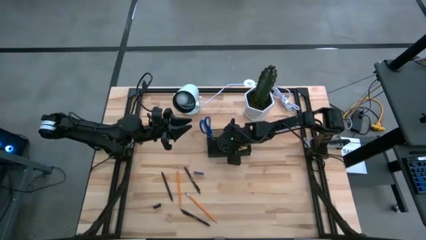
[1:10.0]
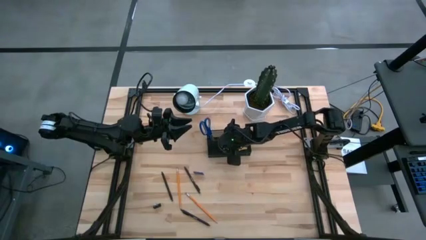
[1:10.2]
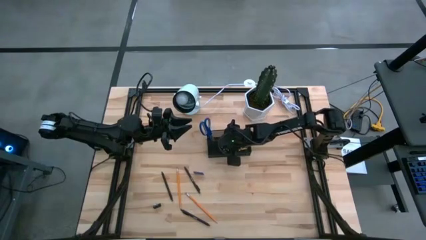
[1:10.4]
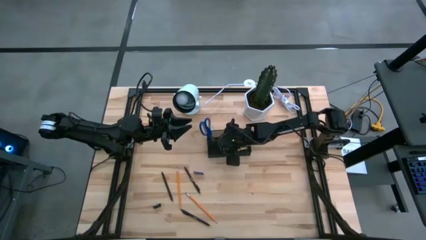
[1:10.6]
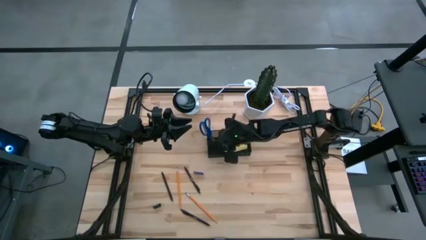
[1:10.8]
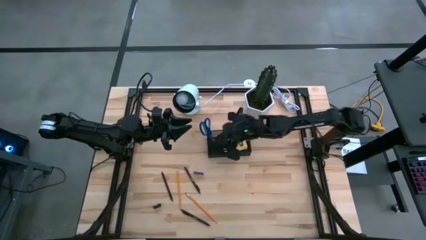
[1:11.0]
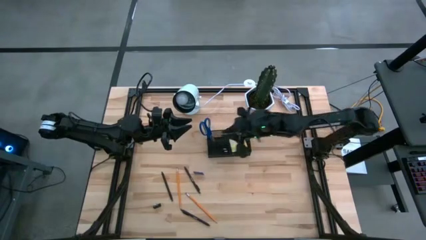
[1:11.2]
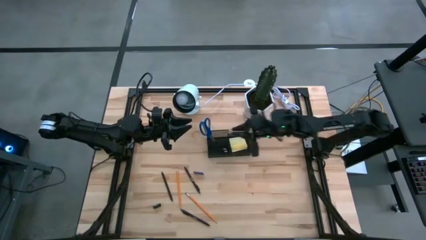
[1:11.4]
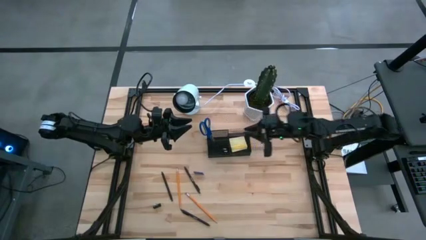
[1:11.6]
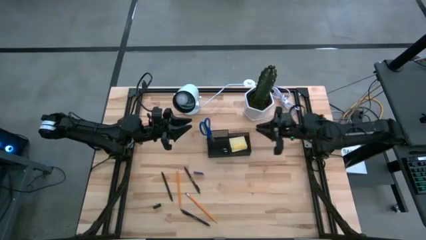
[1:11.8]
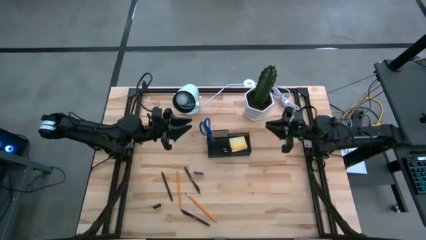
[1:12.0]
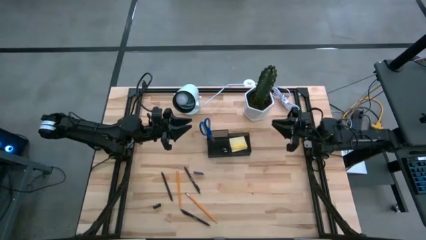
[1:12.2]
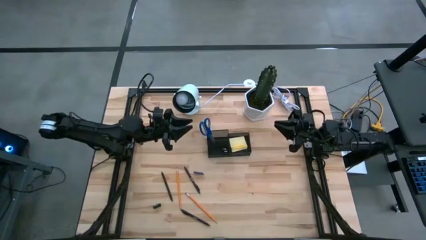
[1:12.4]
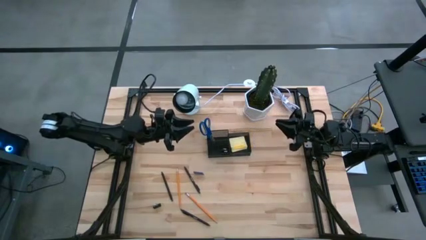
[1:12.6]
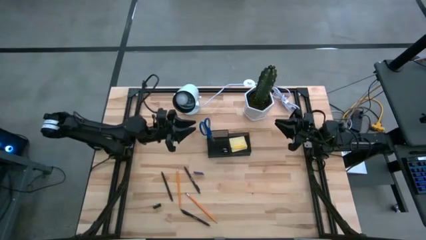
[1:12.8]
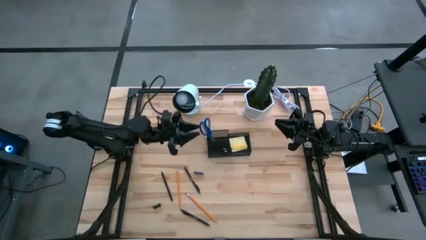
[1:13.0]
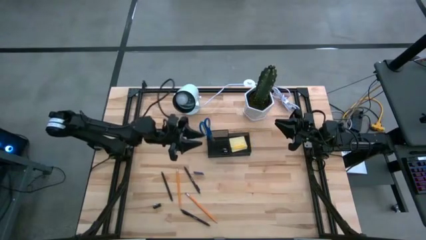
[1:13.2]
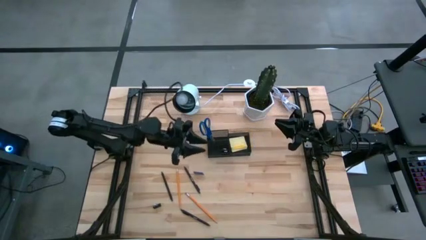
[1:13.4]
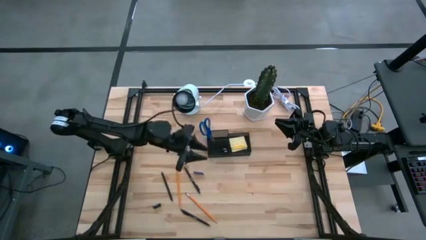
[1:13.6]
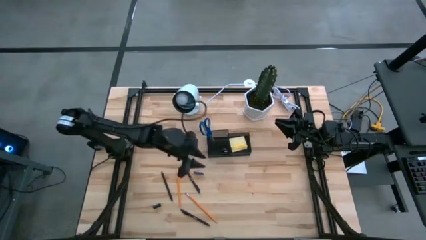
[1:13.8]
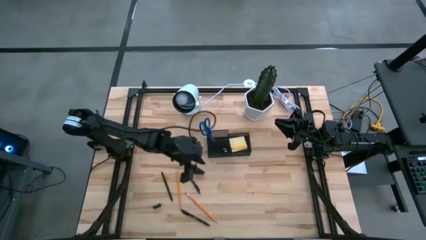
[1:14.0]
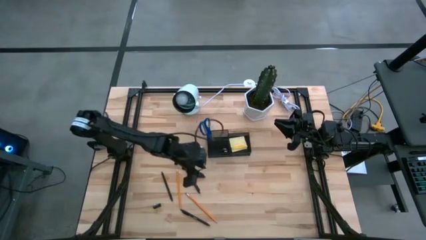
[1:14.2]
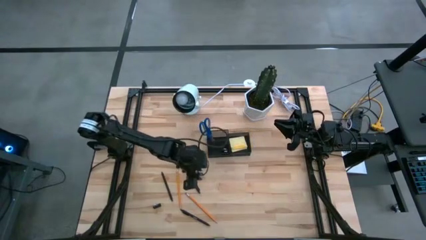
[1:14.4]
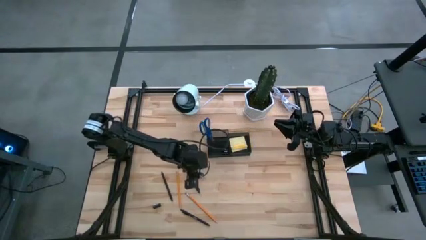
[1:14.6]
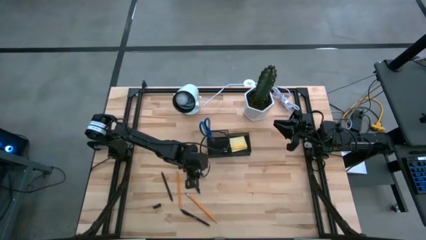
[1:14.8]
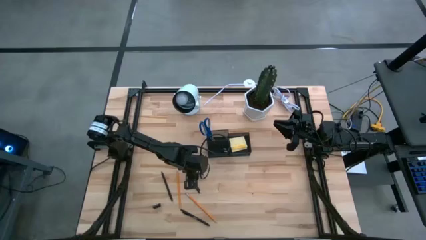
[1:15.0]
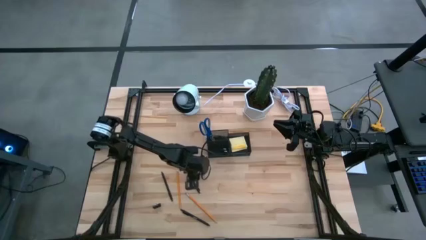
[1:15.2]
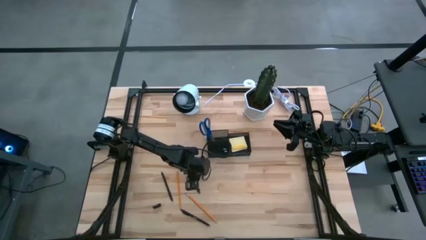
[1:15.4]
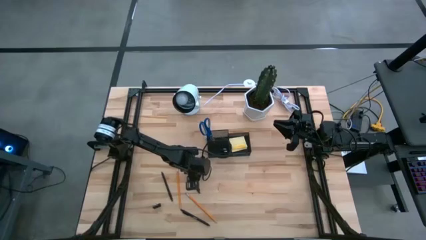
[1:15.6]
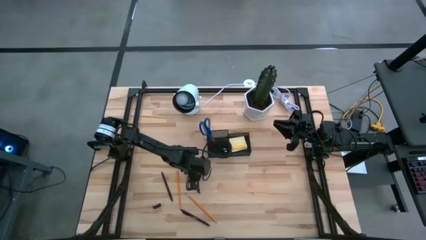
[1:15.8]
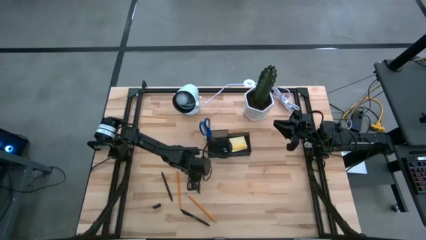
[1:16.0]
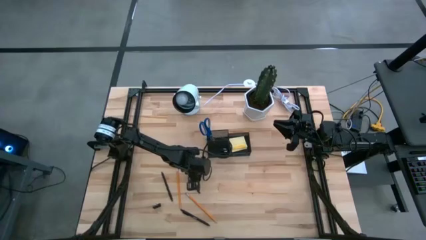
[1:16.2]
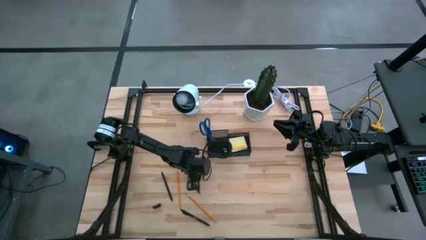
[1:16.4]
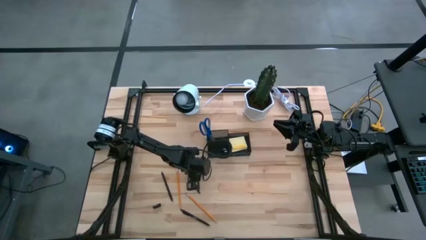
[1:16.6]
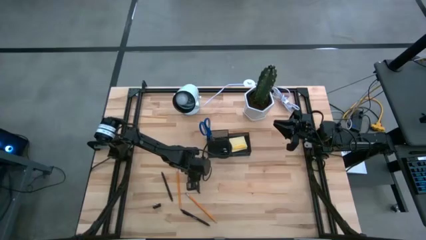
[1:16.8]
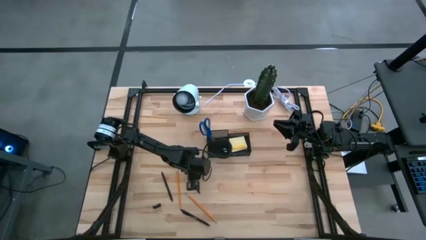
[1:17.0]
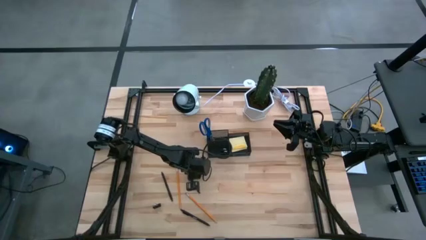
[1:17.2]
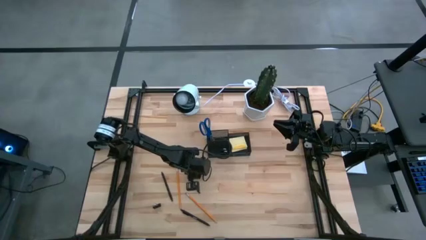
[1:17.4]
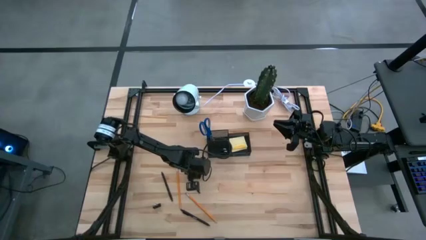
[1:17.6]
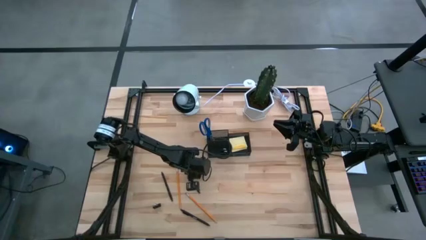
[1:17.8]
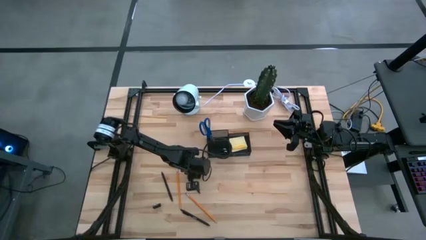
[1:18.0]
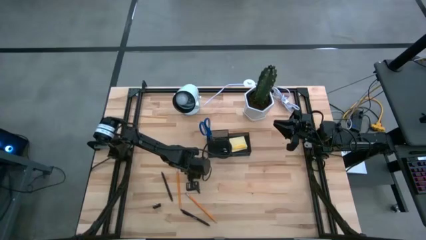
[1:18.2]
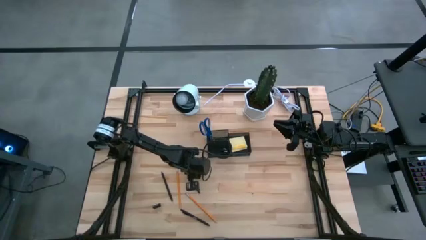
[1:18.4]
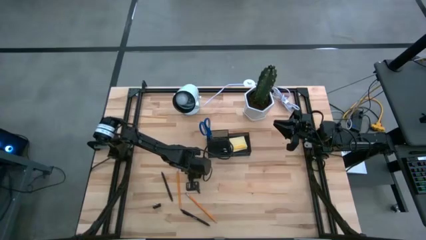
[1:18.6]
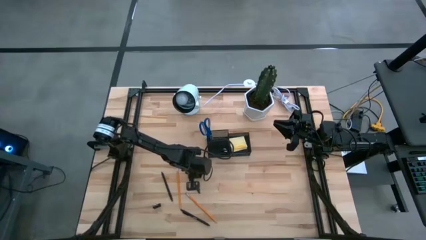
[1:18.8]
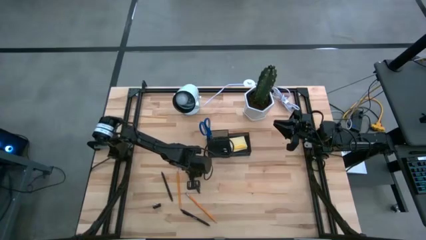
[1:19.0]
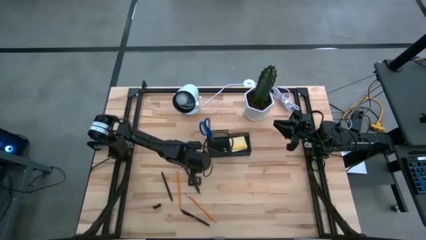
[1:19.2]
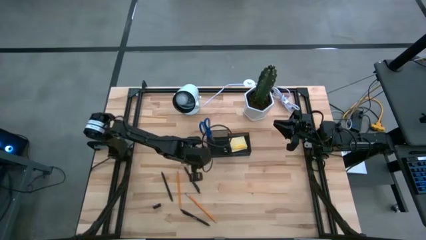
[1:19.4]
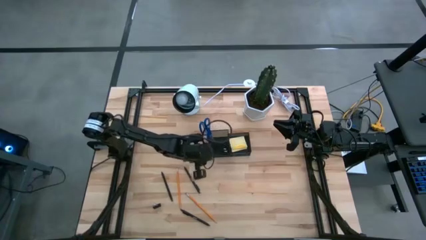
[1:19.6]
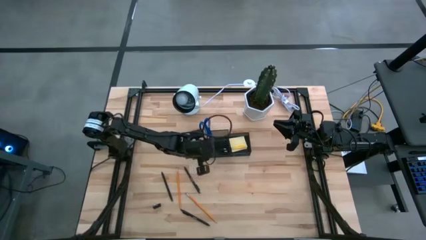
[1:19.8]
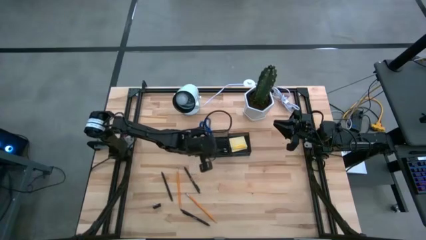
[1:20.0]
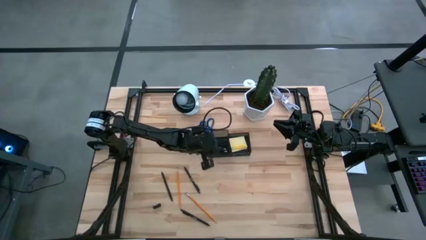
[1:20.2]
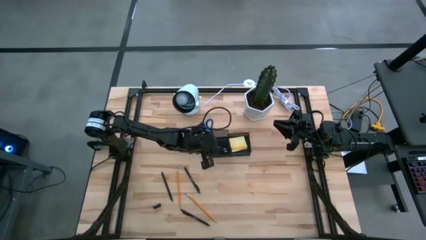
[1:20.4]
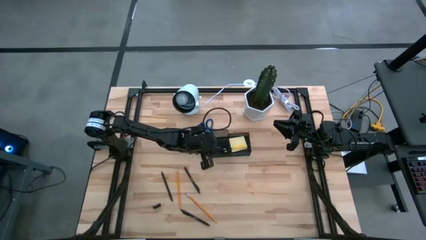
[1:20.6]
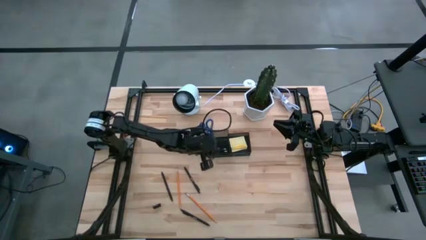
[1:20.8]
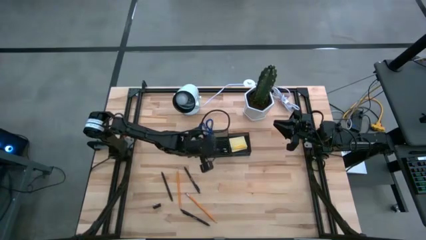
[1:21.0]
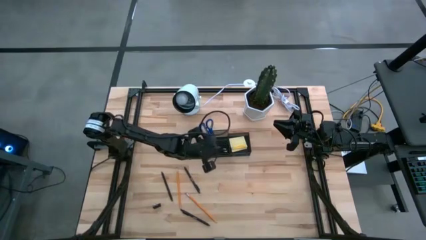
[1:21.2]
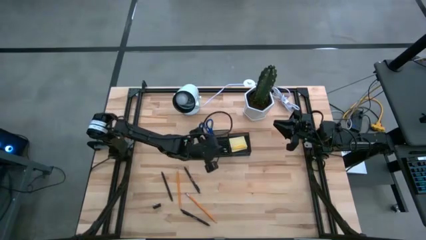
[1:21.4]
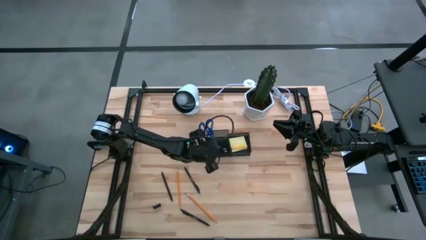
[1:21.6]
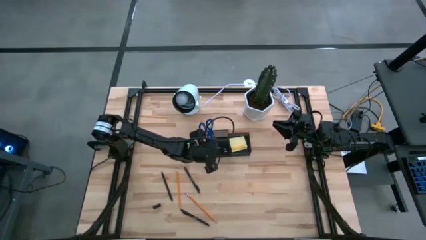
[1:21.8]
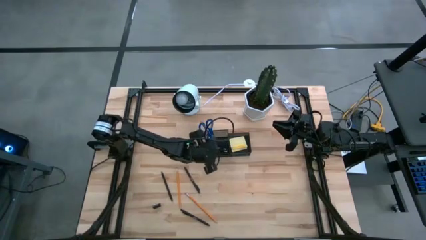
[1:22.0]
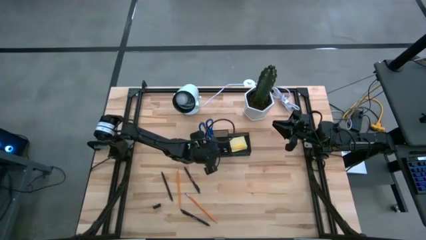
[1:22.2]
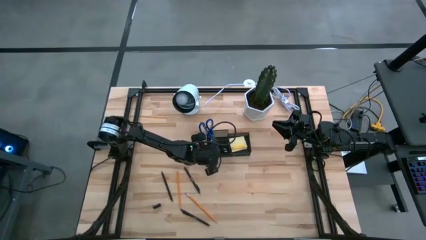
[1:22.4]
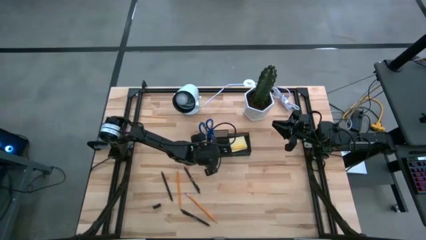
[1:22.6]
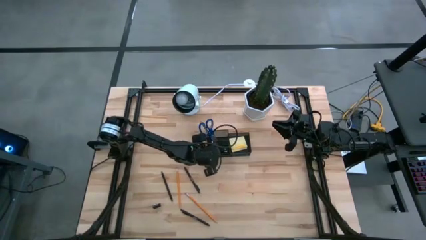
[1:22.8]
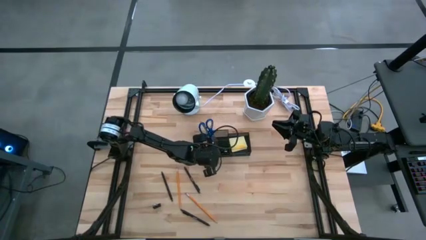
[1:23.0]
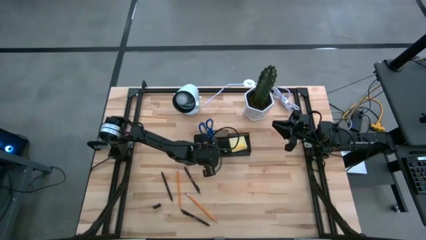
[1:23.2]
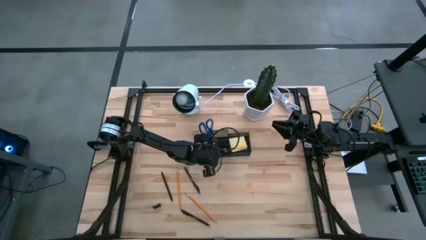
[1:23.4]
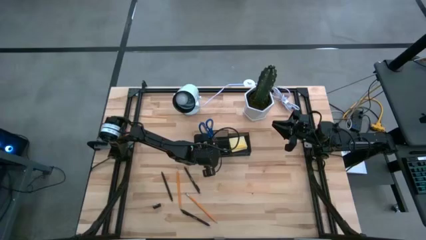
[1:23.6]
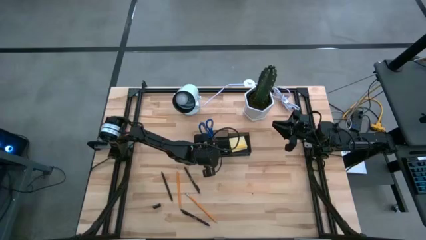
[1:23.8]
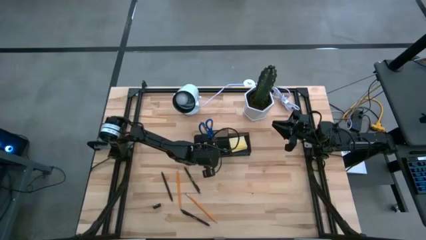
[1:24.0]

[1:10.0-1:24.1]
Task: Pick and place office supplies into organizer
Put the blue eraser into the black desk organizer
